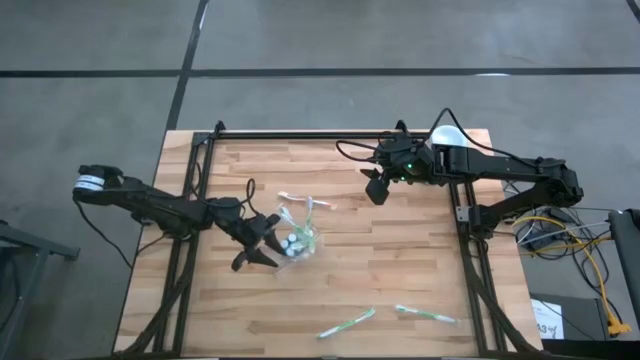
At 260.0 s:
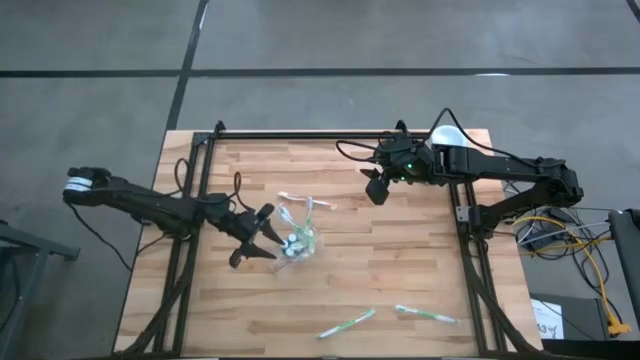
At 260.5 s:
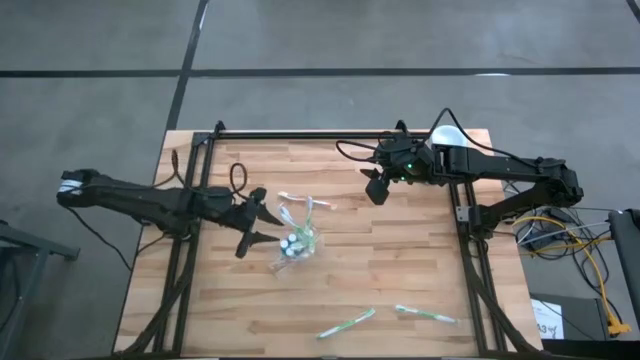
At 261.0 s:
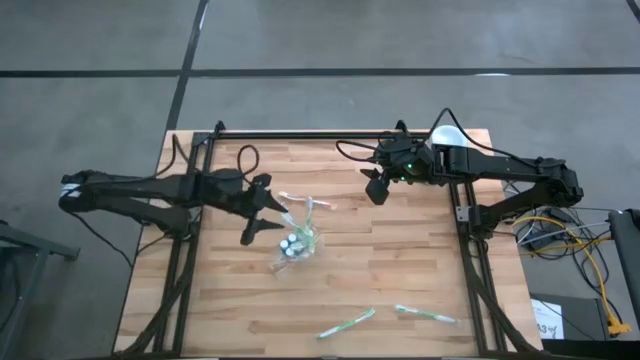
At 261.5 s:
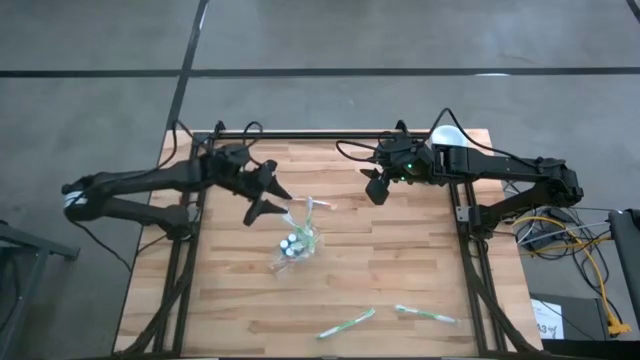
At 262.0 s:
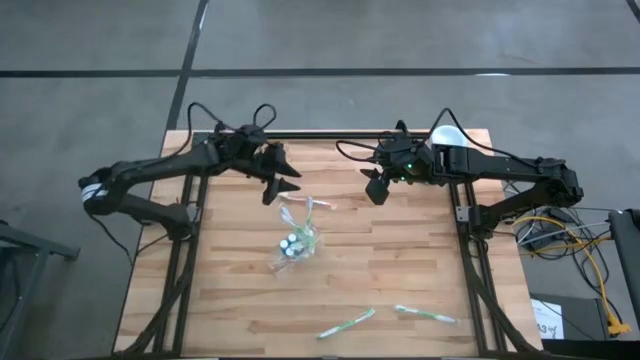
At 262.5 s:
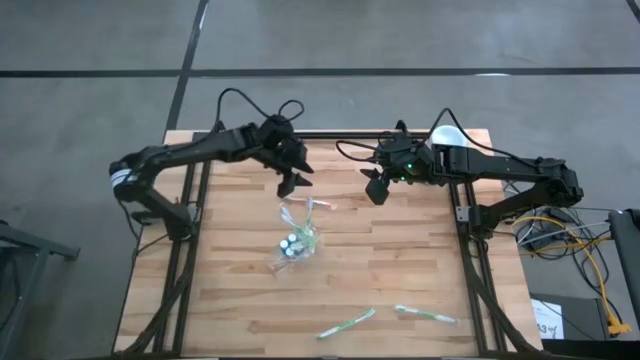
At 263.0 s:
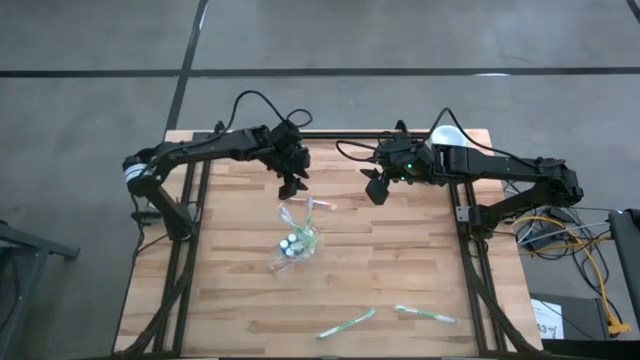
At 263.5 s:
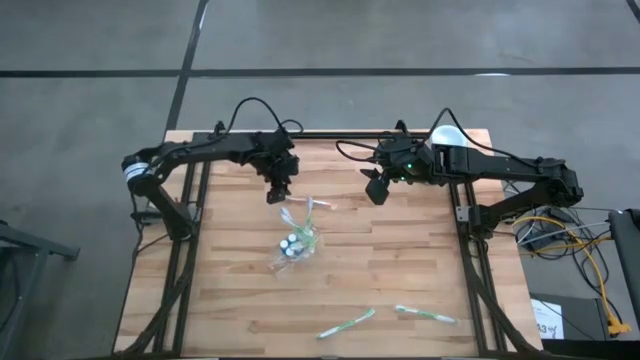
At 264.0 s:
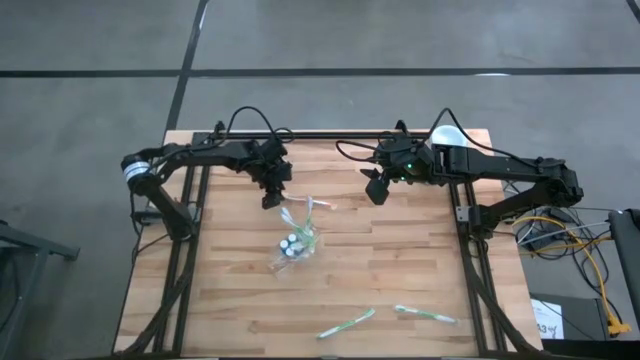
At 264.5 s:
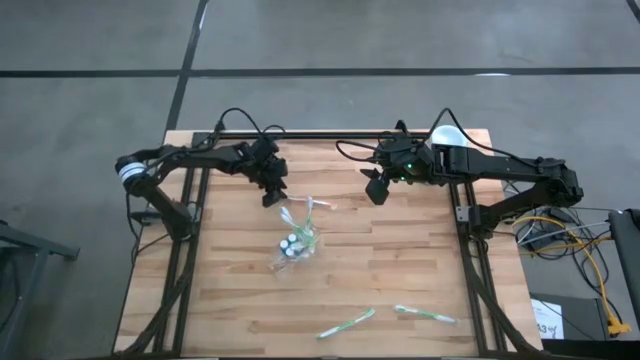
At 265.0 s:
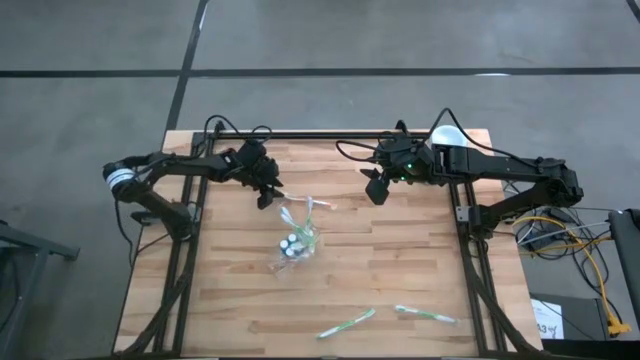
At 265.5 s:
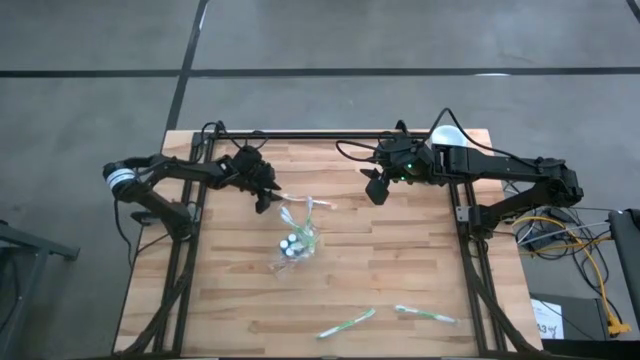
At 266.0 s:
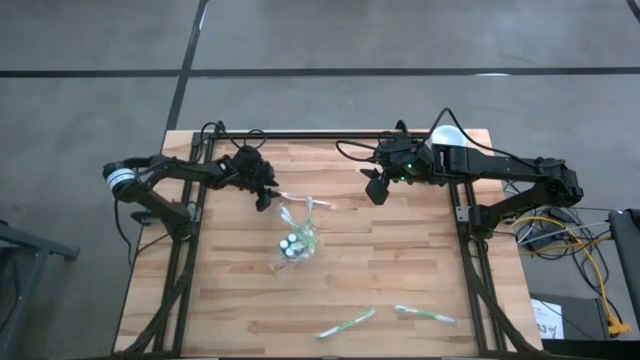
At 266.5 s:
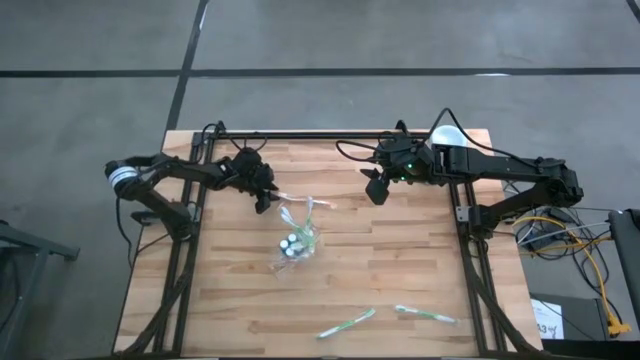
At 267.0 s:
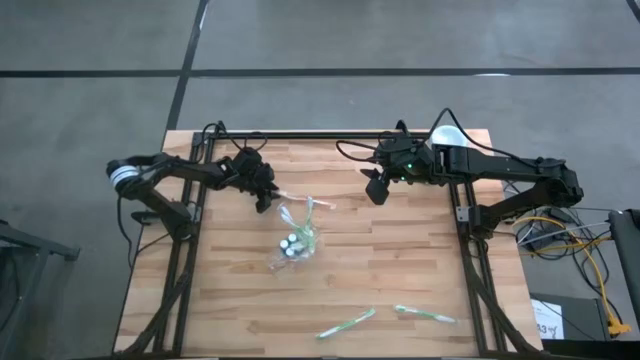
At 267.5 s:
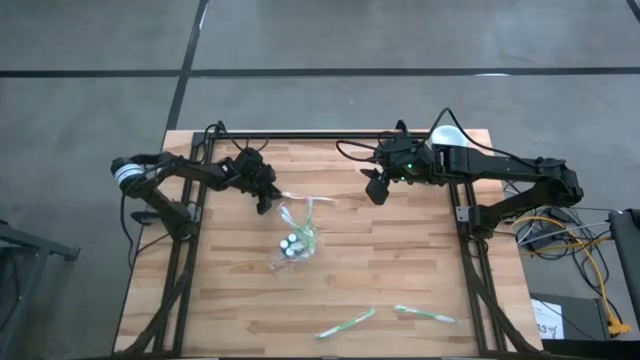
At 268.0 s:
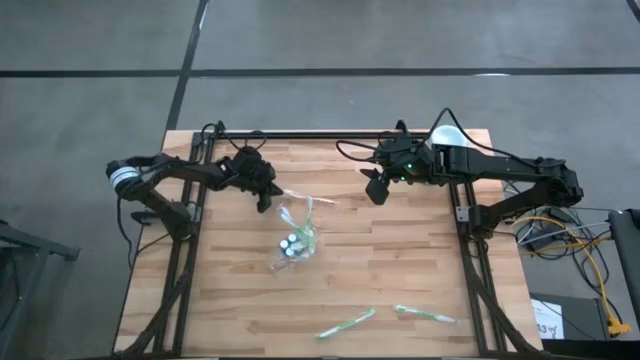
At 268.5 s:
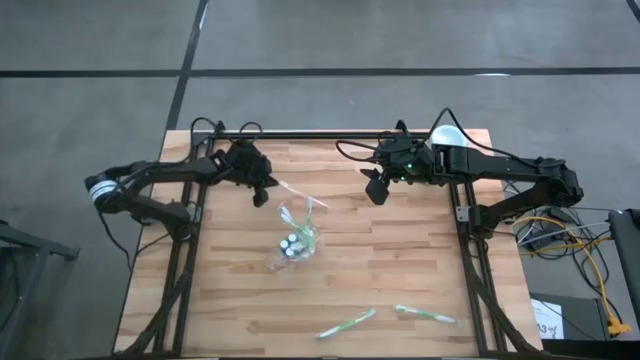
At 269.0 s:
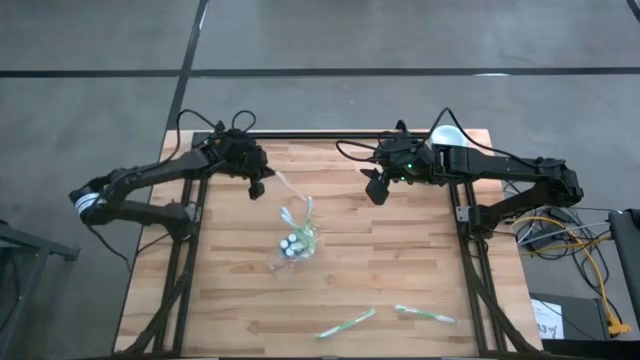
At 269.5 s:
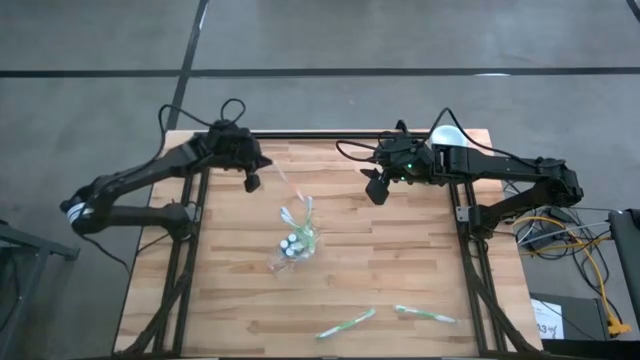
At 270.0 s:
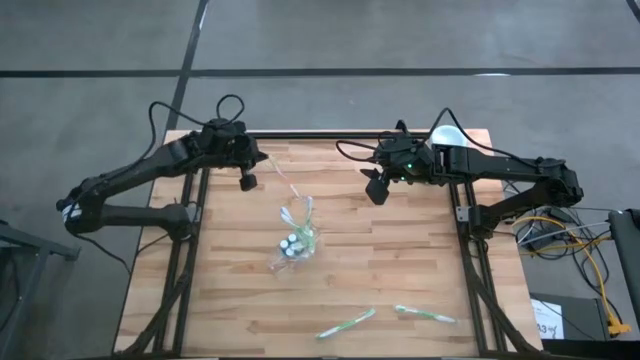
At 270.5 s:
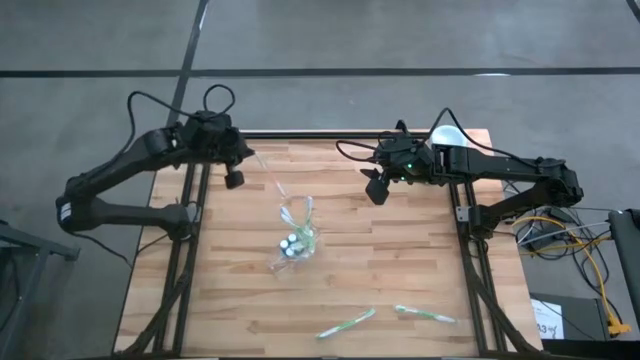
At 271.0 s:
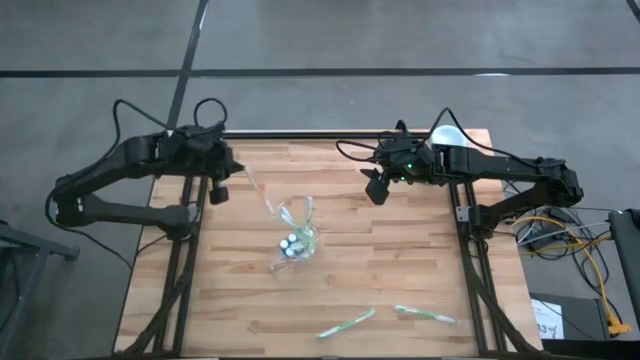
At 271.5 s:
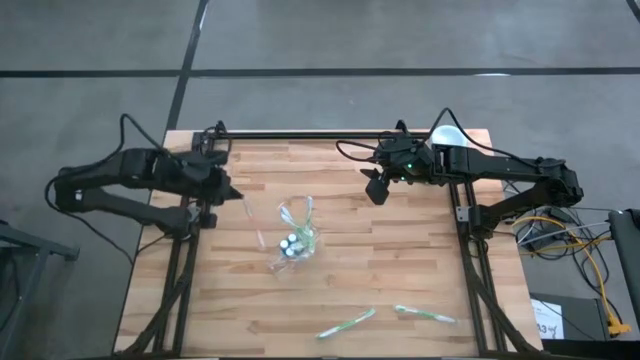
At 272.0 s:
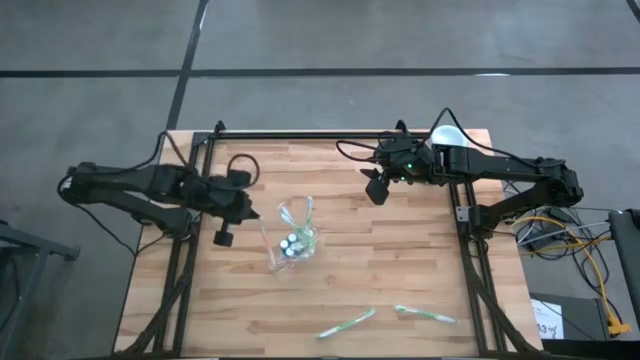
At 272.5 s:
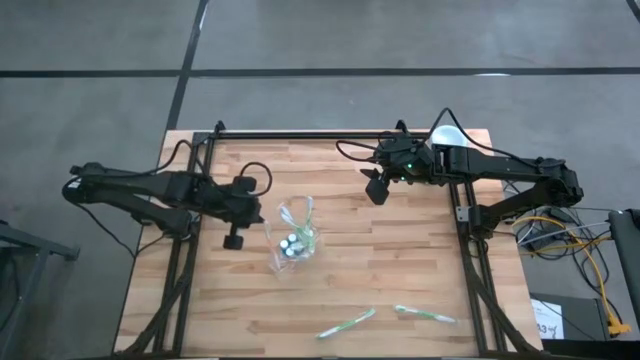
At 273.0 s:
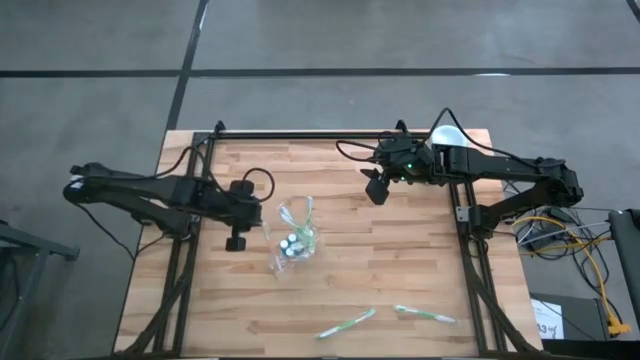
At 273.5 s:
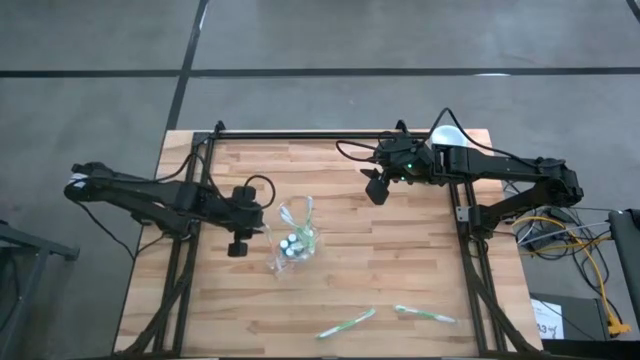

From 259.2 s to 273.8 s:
Task: Pick & Place toothbrushing station
Put the orange toothbrush into the transparent organizer

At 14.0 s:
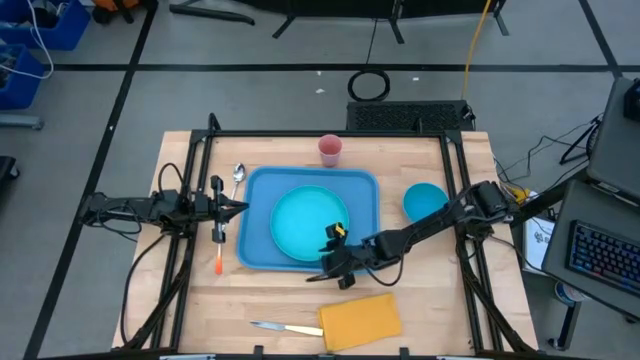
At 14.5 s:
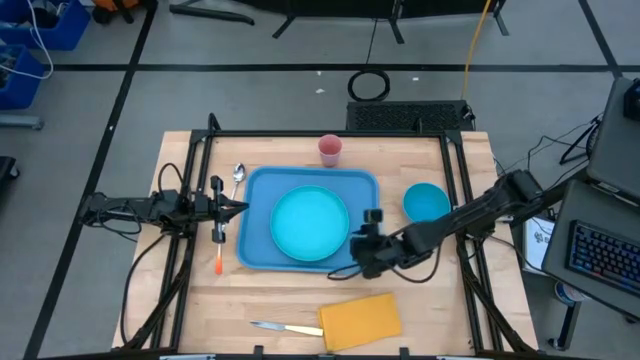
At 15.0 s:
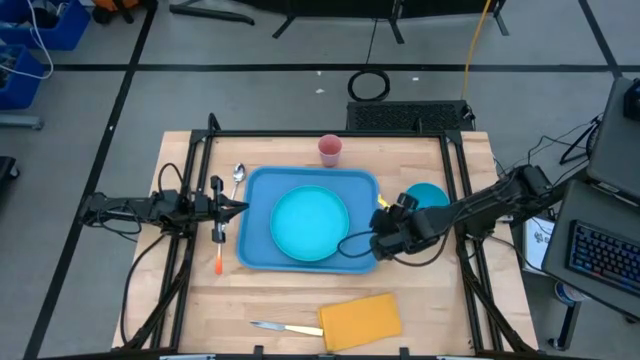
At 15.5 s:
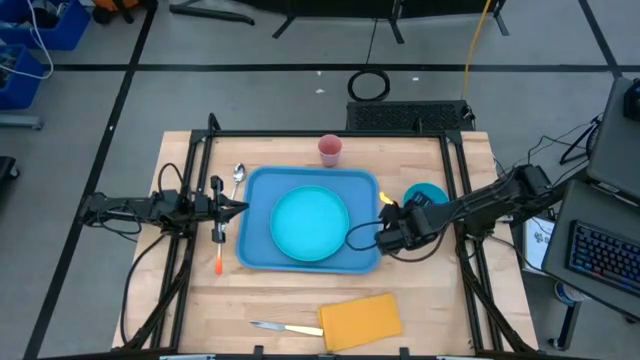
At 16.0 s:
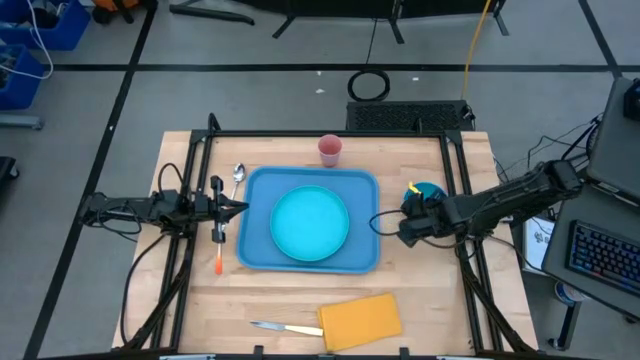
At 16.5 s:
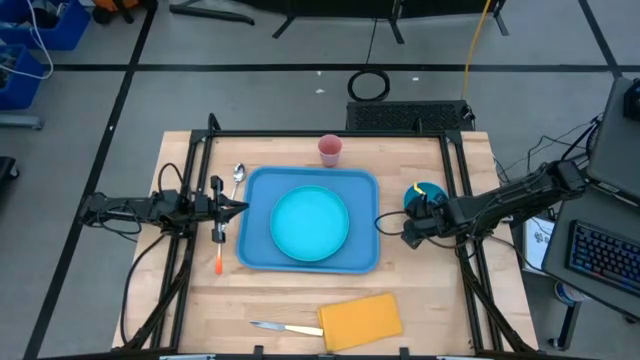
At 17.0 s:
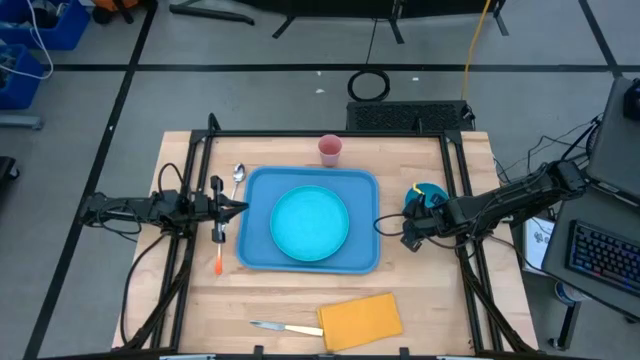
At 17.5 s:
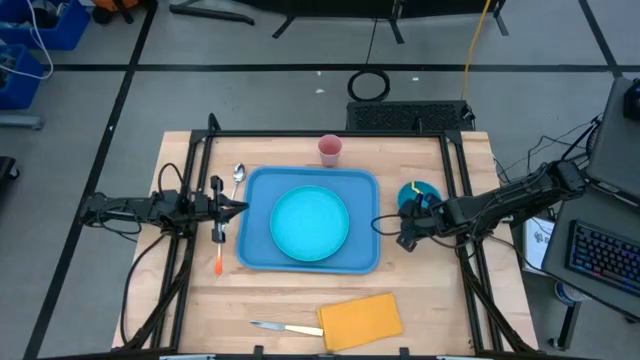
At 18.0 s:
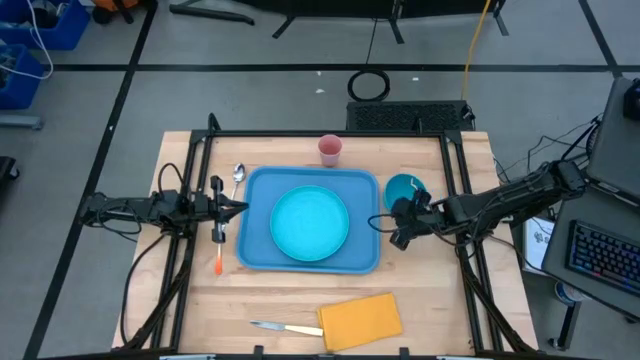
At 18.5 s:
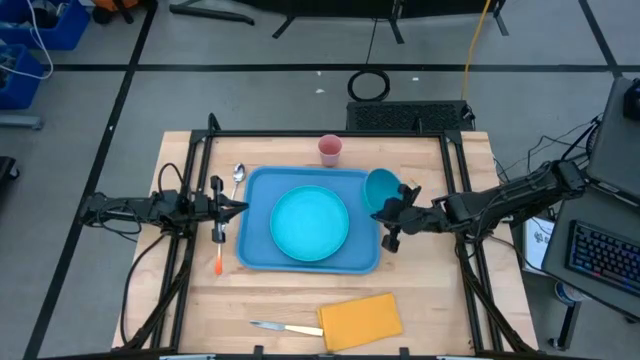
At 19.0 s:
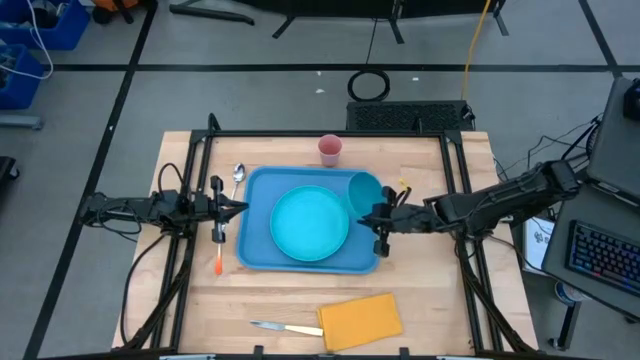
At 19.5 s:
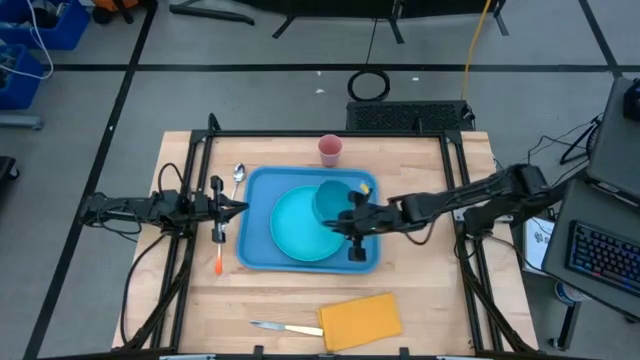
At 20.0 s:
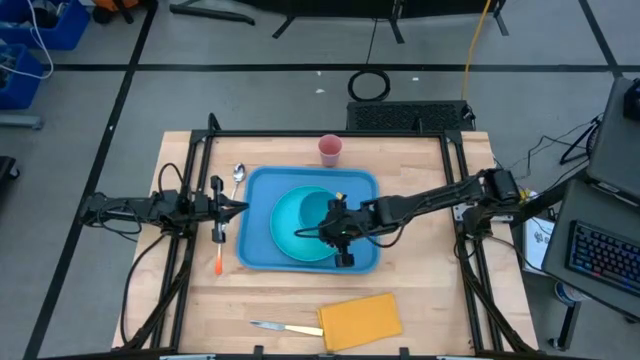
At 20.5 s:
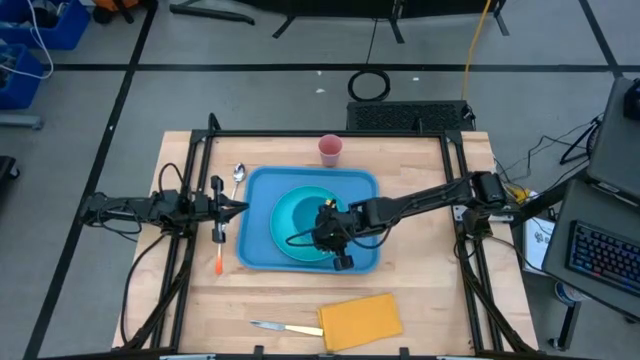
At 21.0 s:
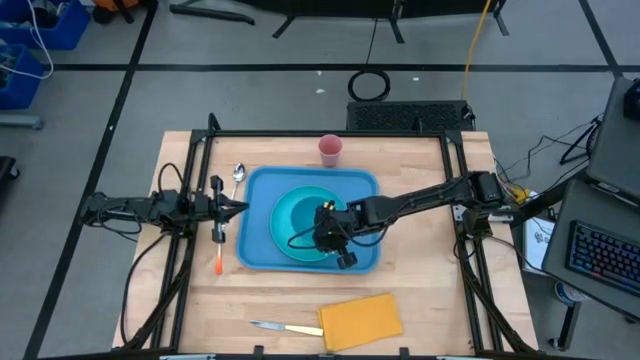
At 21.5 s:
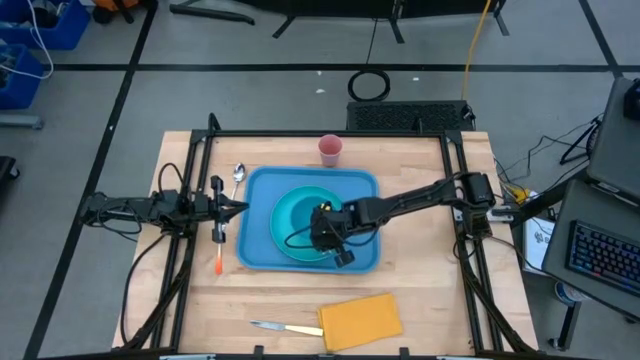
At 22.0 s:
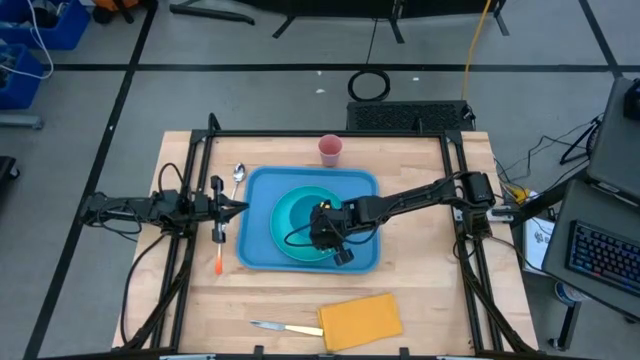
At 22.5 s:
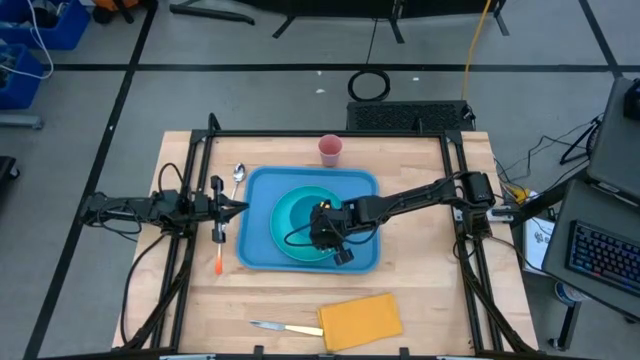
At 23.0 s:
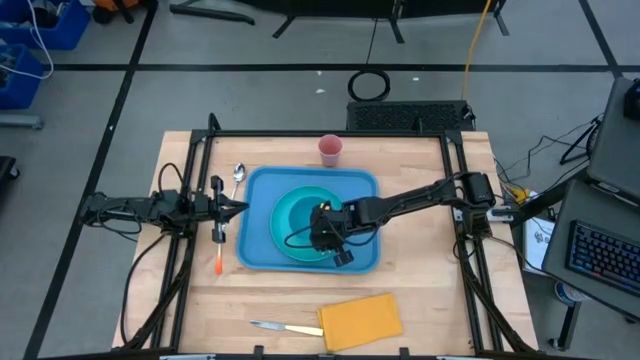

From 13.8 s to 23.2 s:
Task: Set up tray
Put the blue bowl on top of the blue plate
